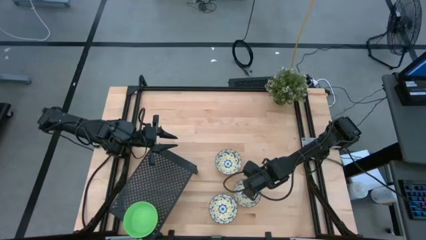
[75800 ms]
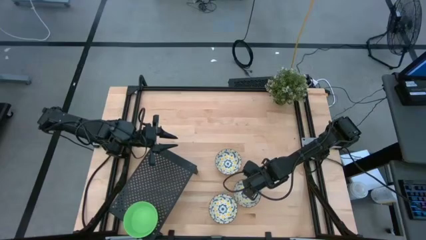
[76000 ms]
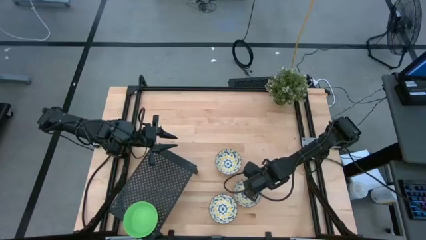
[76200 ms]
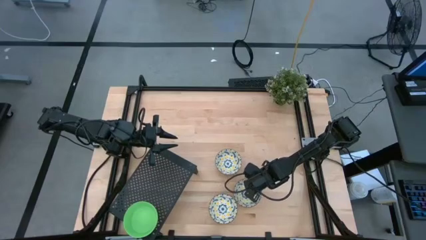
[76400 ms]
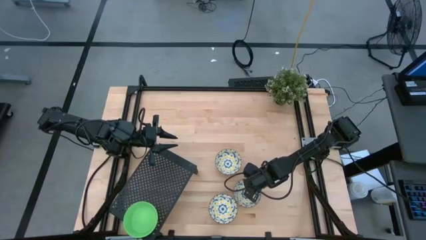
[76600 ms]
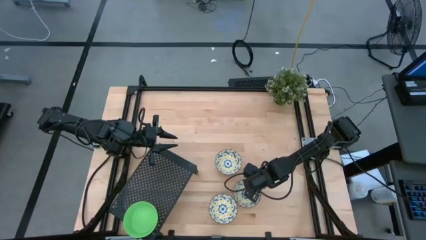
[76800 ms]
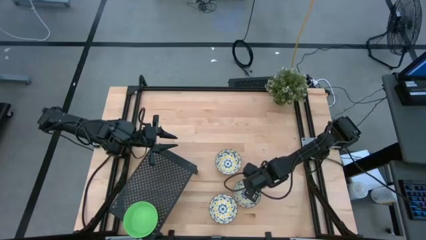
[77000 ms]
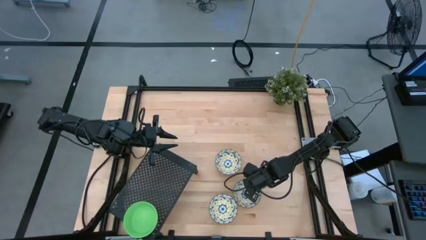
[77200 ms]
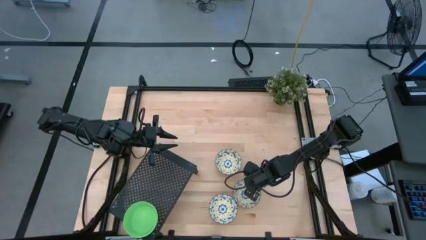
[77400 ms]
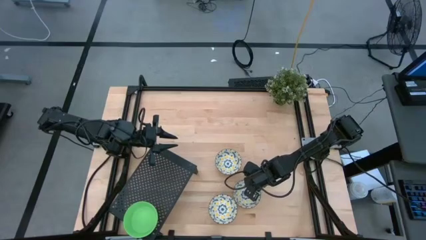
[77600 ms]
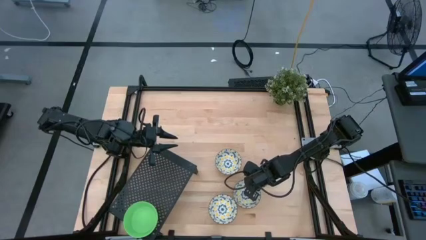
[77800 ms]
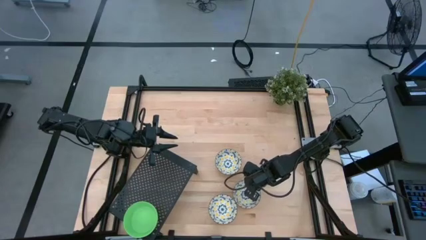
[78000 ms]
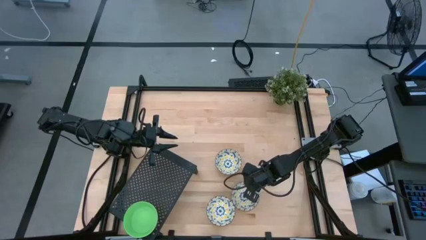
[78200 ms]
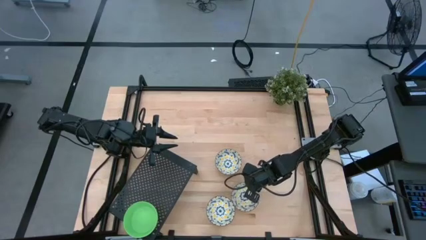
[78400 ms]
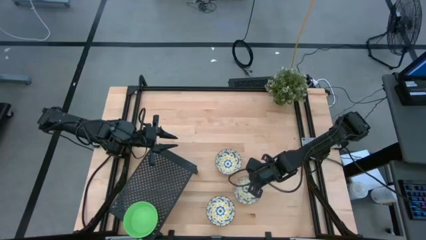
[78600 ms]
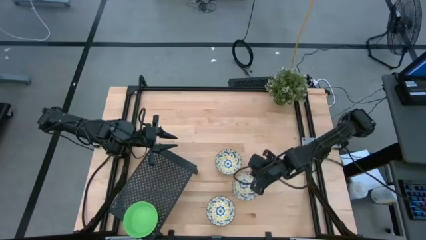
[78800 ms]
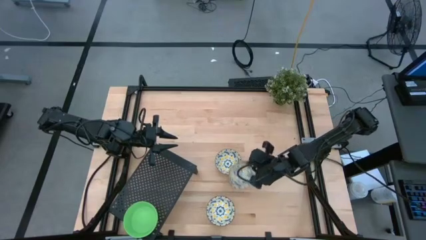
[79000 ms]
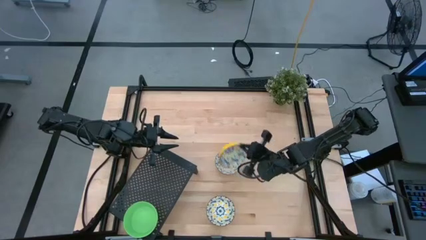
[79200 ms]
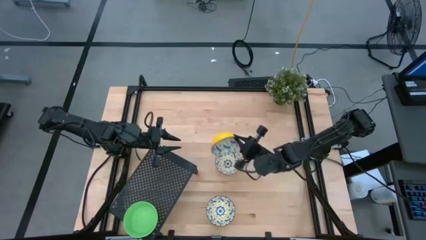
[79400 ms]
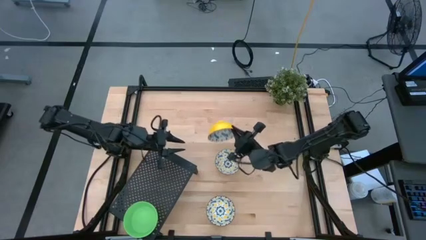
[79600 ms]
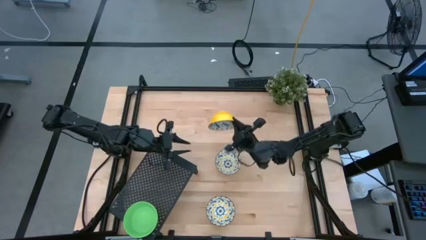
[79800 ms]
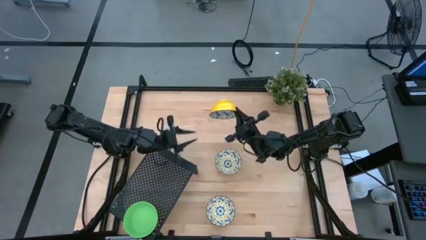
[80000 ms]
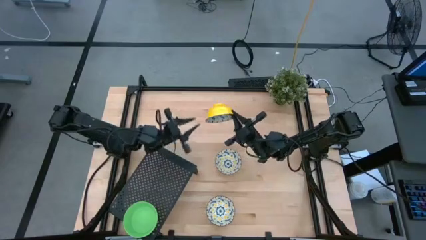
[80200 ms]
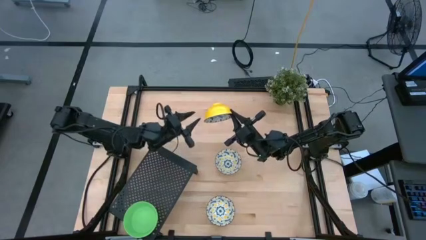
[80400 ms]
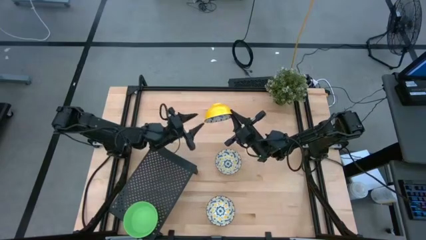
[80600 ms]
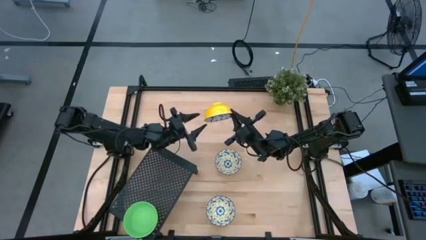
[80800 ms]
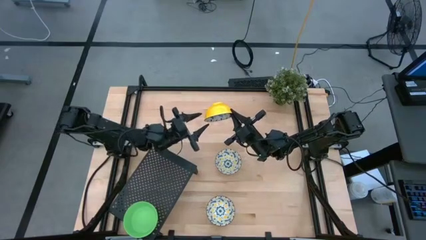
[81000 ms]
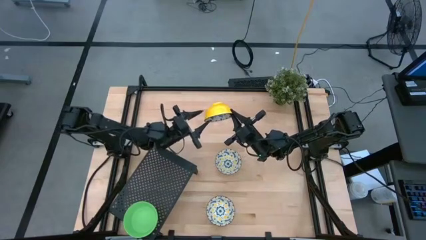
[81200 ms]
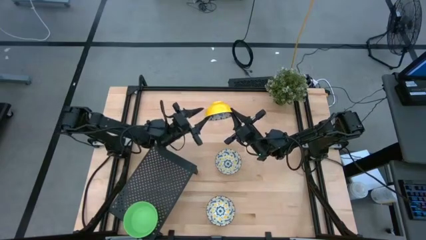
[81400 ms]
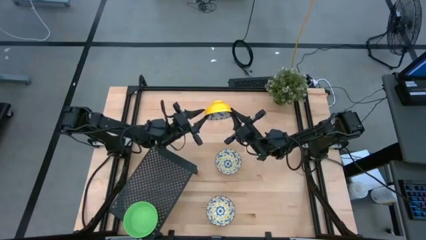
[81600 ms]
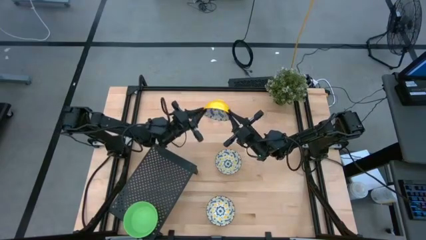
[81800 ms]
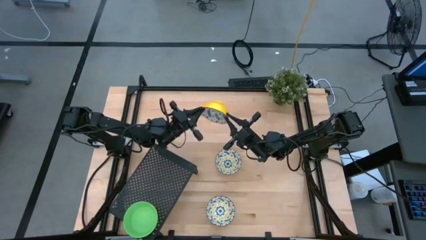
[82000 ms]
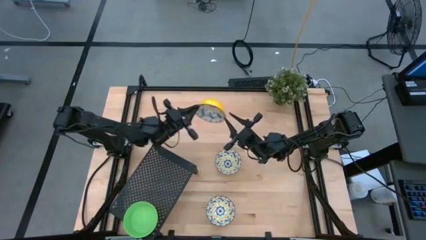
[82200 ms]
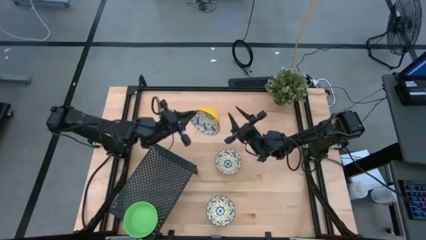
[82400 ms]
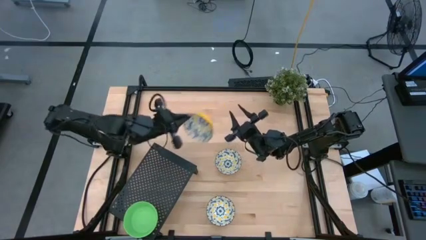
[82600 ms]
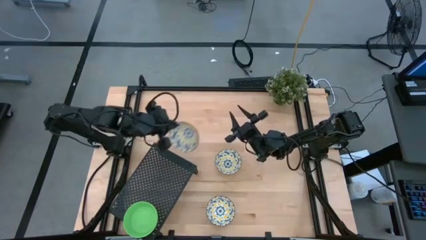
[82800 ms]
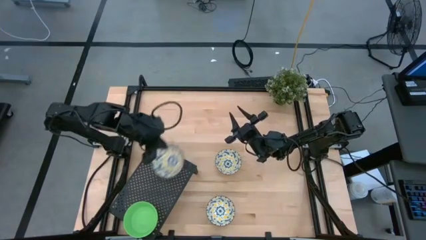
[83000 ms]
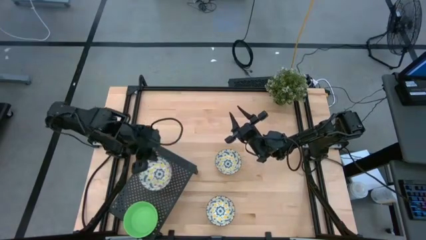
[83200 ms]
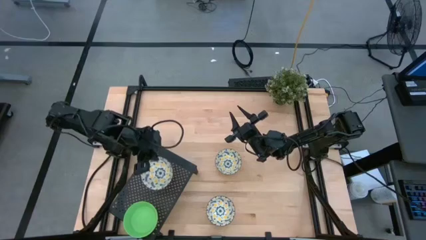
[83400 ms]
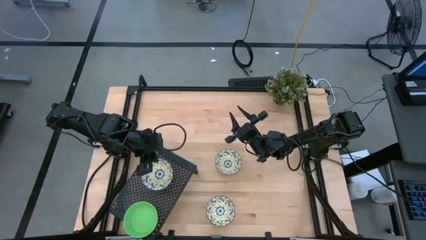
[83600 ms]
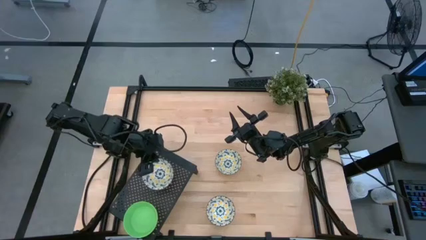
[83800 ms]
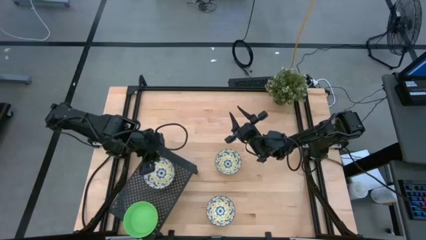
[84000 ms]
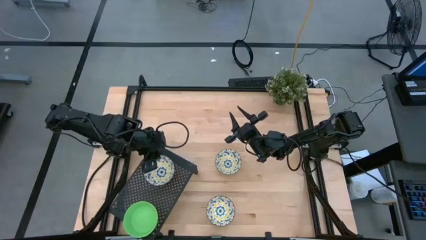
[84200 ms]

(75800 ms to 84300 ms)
Task: Pick & Place Mini bowls
Put the middle yellow patterned bowl on the shelf

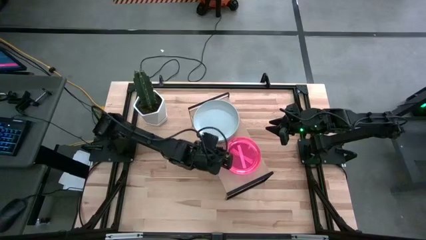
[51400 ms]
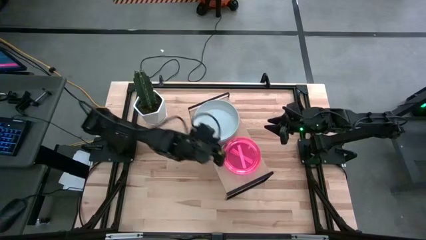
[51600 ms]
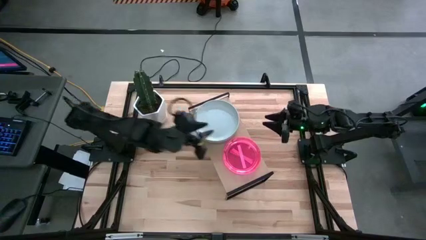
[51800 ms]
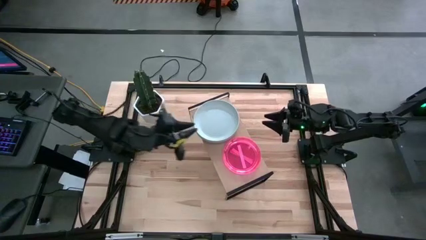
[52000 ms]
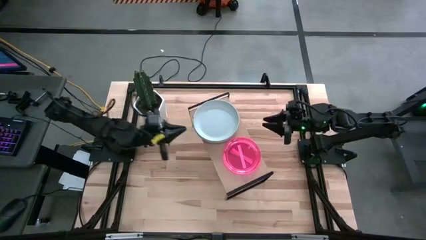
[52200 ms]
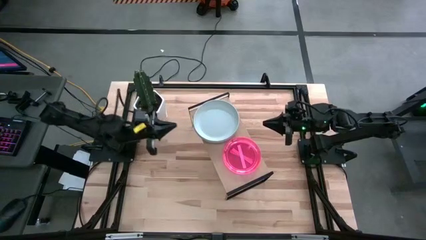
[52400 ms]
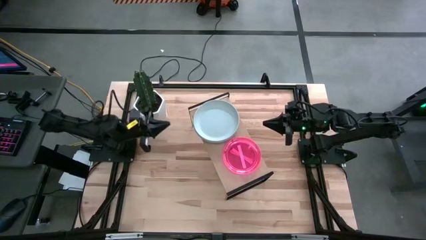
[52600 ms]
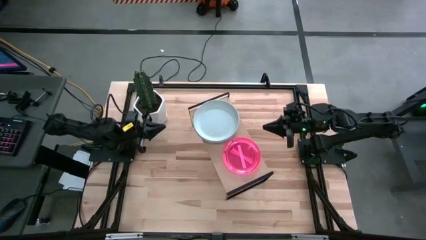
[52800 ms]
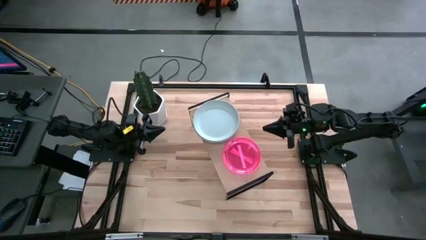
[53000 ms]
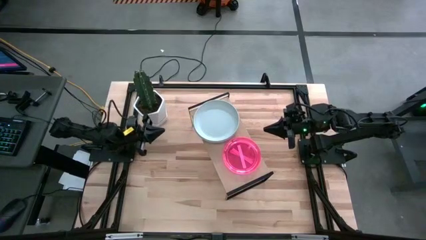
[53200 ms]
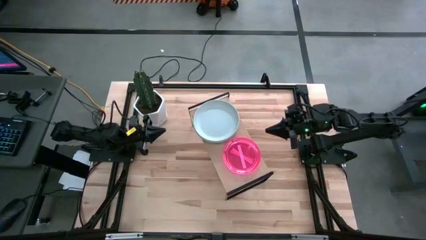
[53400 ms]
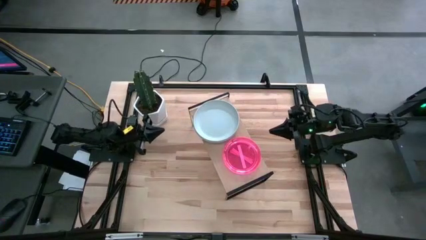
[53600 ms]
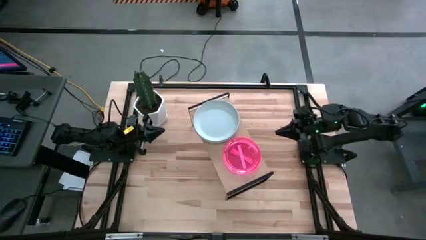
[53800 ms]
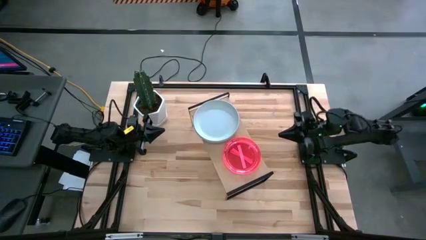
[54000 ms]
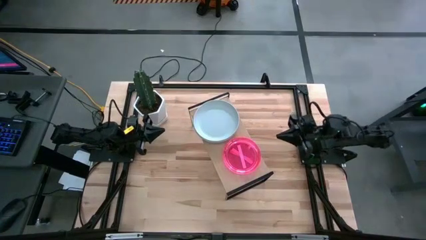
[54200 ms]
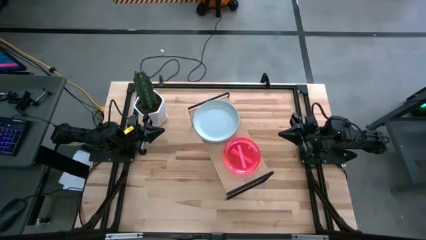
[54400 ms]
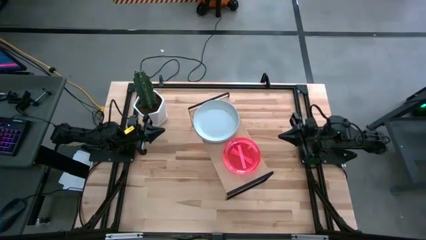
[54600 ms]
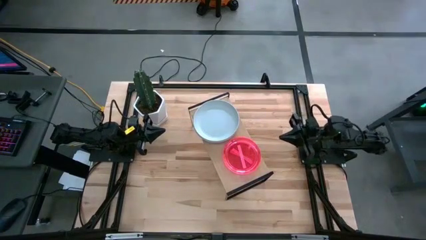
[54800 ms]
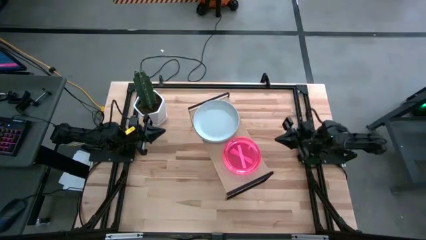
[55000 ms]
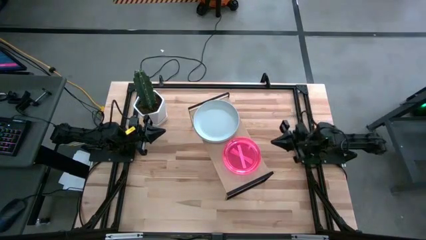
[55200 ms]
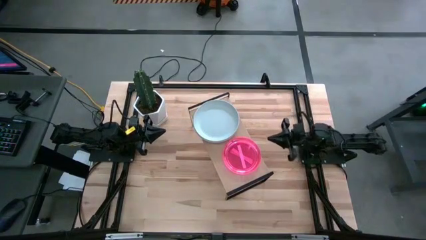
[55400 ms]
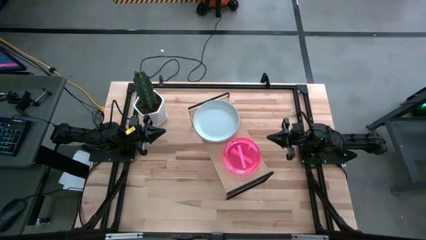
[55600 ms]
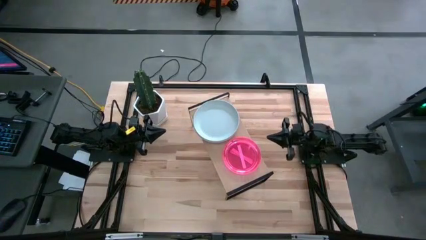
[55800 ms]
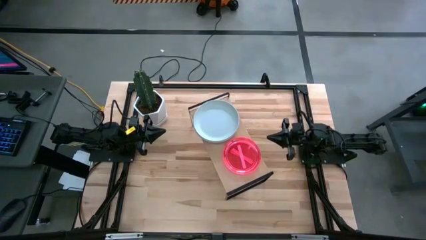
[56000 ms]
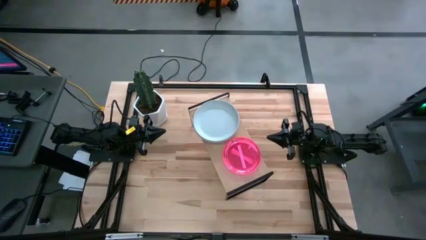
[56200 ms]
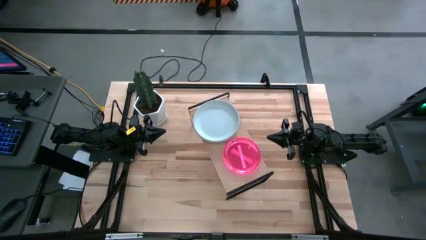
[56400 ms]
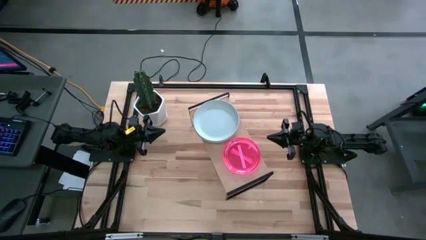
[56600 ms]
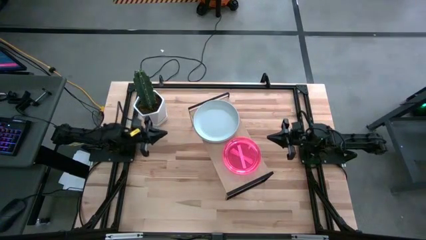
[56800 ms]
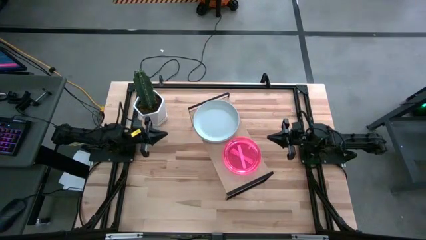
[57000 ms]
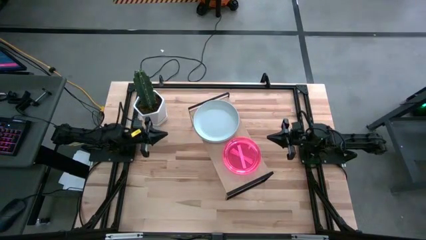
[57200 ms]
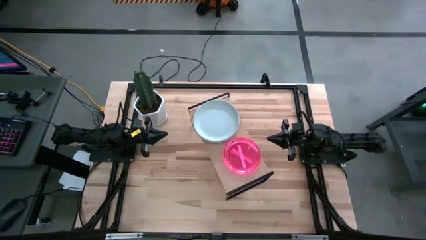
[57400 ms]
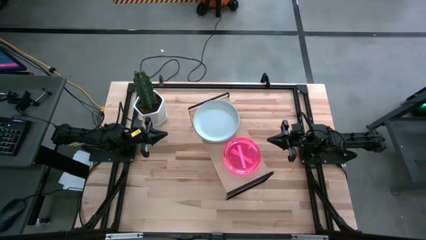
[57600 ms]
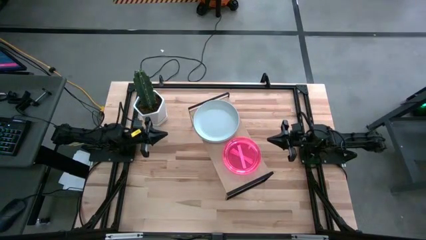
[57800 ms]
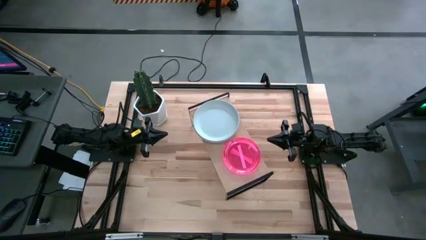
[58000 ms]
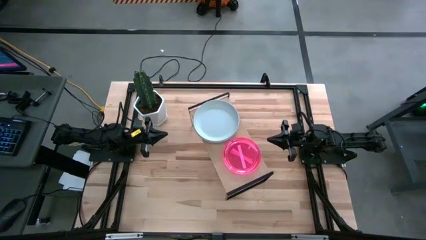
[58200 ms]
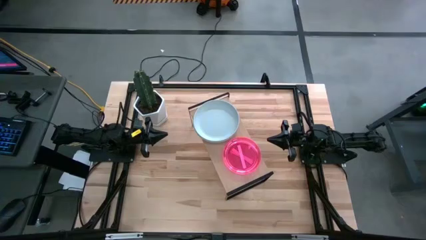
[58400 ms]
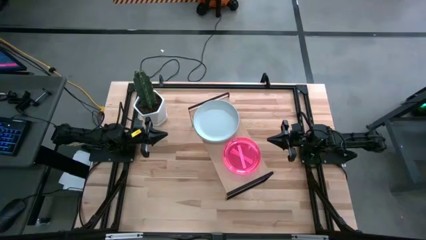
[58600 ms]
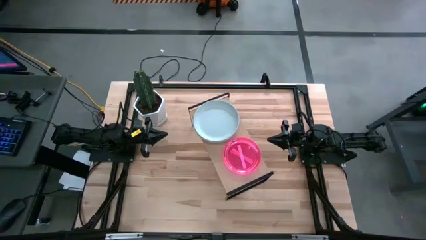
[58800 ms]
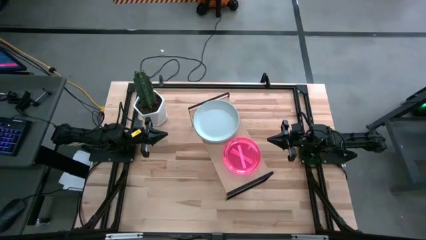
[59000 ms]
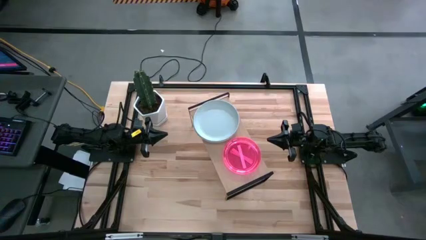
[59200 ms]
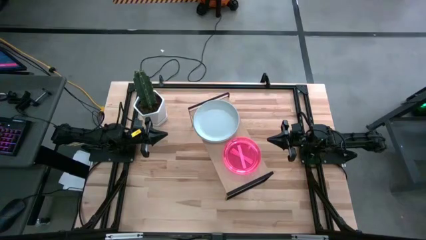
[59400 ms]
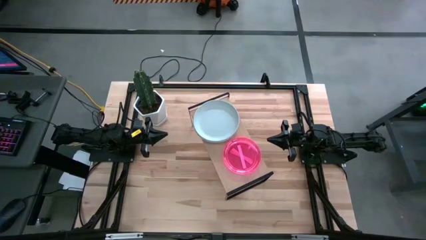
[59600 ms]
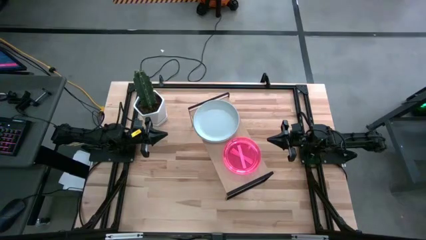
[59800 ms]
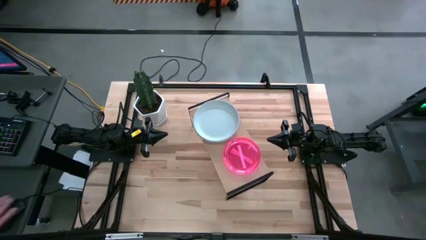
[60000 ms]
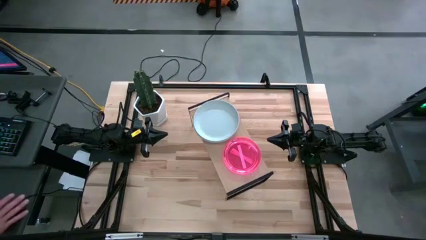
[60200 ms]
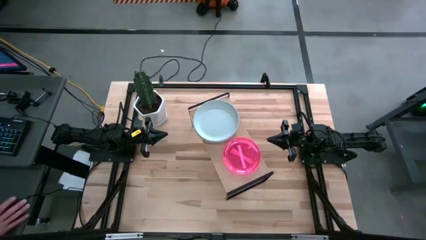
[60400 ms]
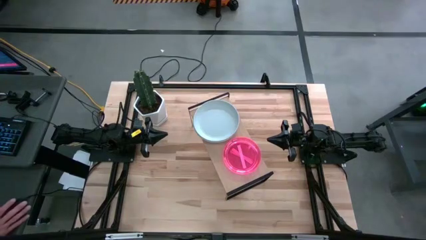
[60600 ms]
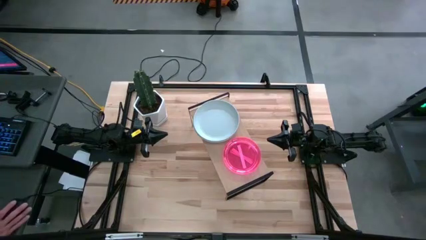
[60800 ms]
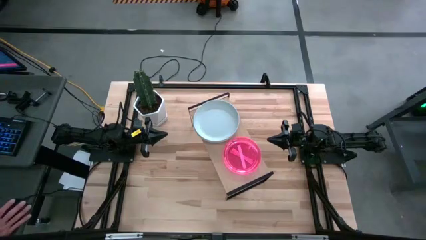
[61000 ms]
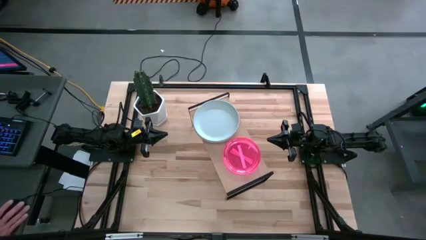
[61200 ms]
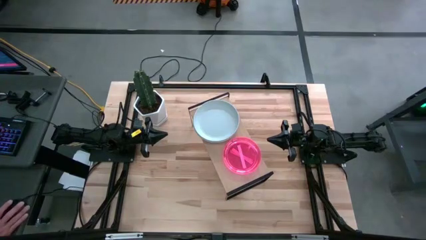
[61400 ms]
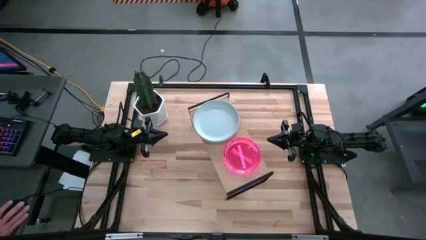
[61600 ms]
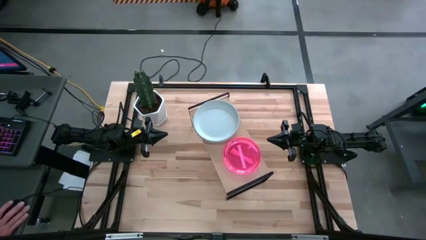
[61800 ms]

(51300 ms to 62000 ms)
Task: Place and stack plates onto a shelf
Return to Home Position
